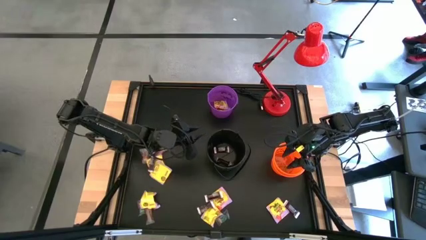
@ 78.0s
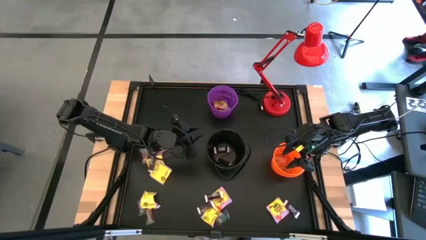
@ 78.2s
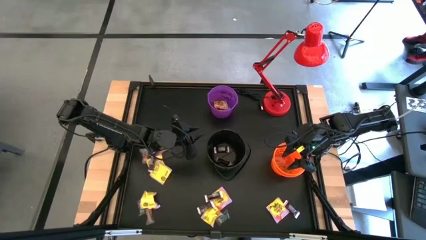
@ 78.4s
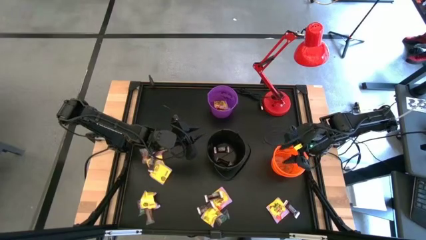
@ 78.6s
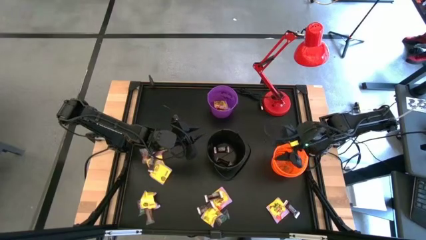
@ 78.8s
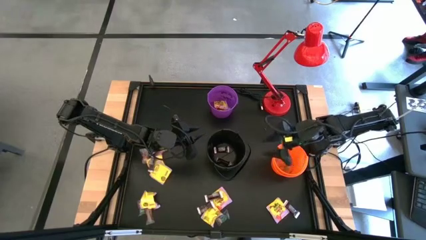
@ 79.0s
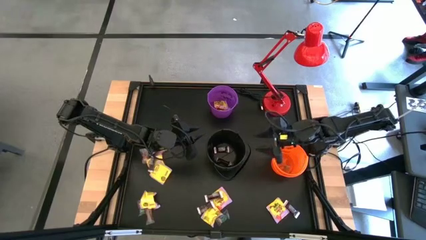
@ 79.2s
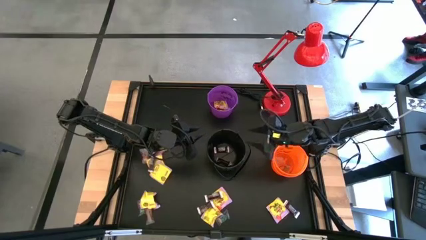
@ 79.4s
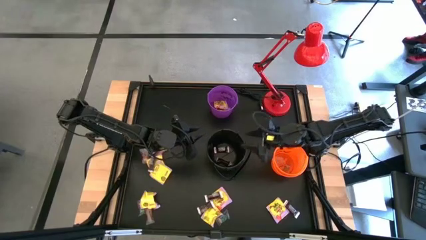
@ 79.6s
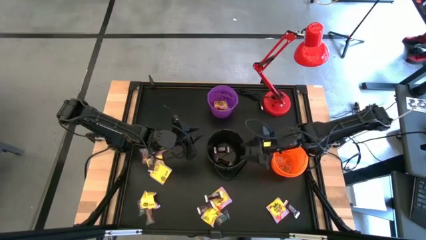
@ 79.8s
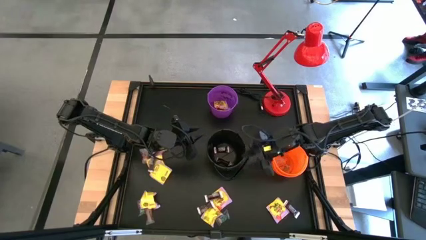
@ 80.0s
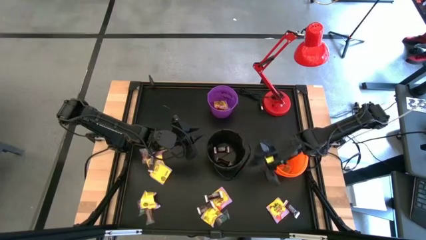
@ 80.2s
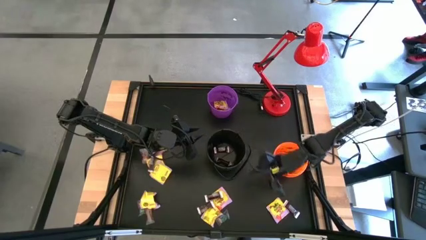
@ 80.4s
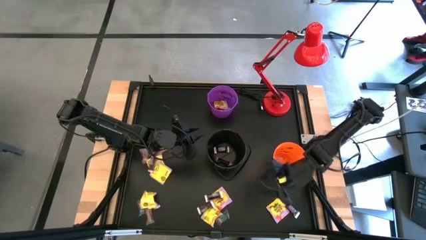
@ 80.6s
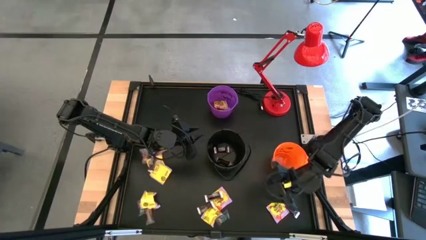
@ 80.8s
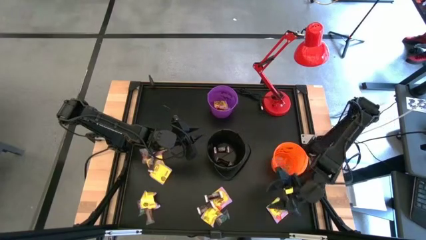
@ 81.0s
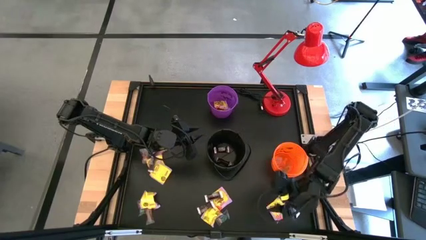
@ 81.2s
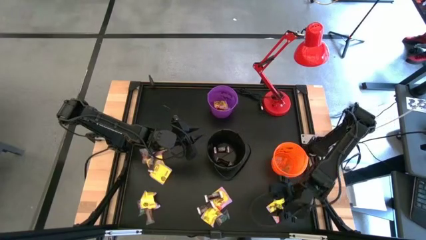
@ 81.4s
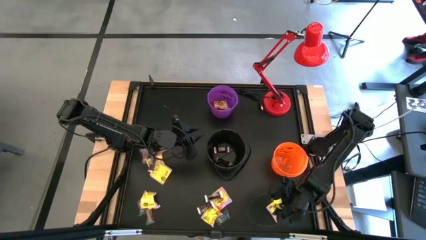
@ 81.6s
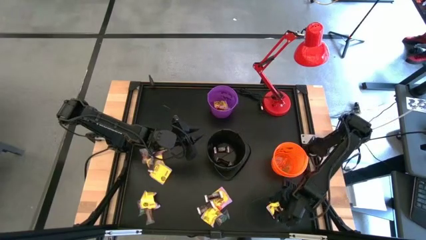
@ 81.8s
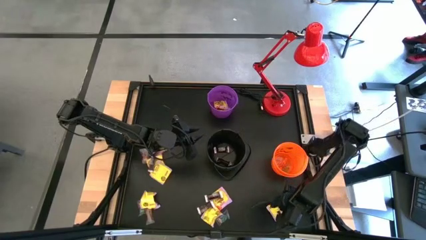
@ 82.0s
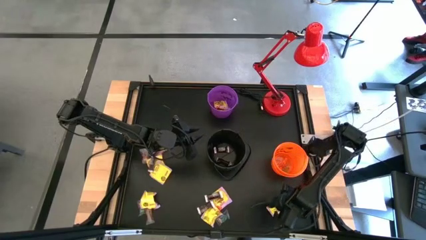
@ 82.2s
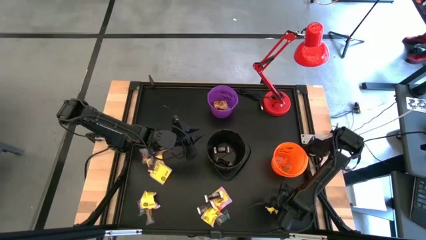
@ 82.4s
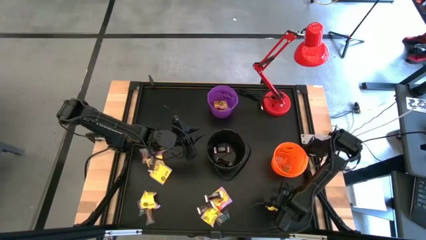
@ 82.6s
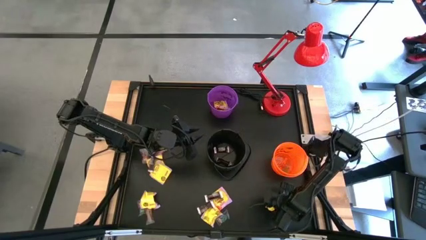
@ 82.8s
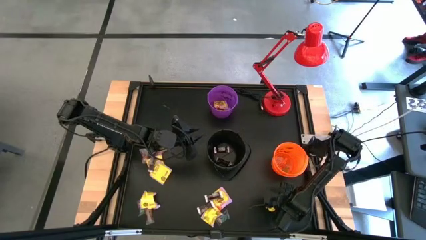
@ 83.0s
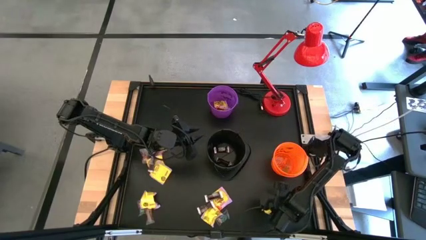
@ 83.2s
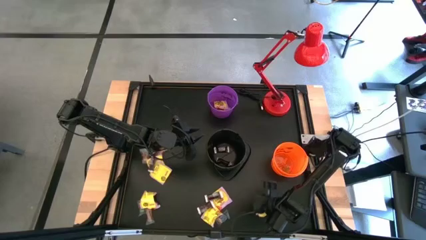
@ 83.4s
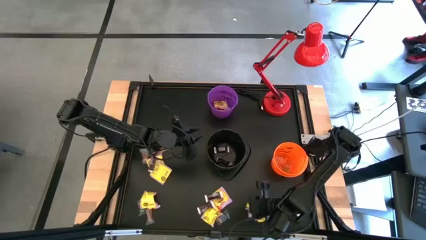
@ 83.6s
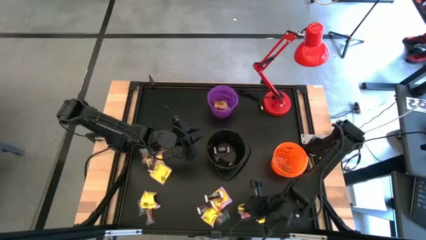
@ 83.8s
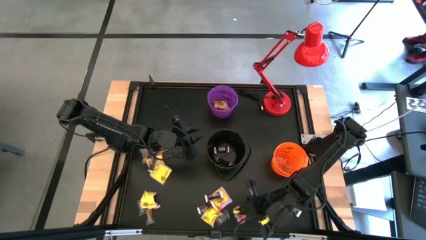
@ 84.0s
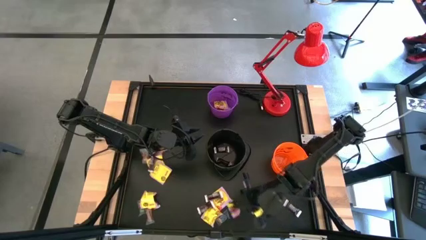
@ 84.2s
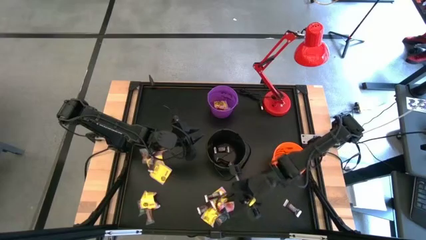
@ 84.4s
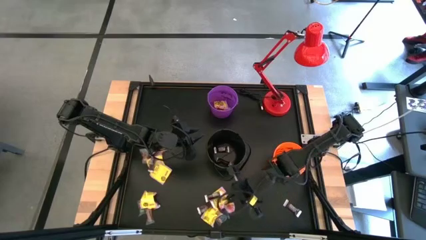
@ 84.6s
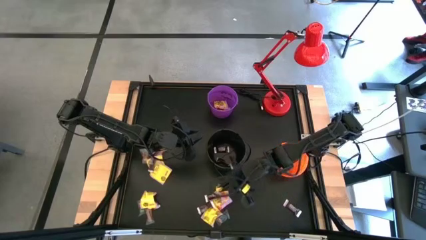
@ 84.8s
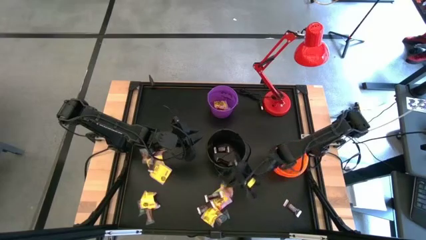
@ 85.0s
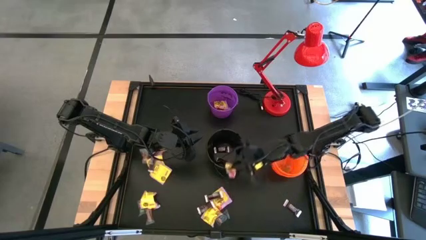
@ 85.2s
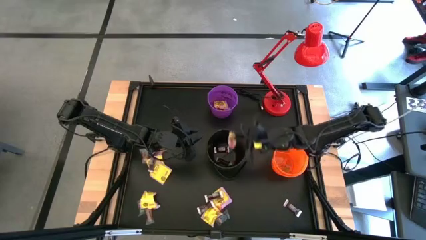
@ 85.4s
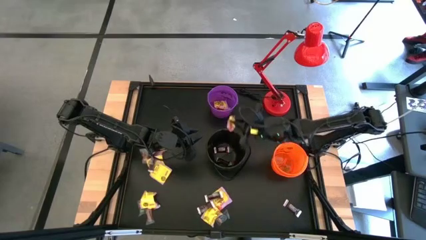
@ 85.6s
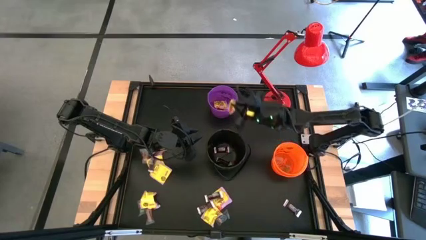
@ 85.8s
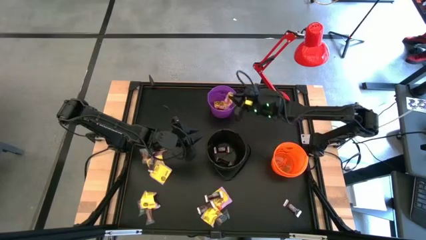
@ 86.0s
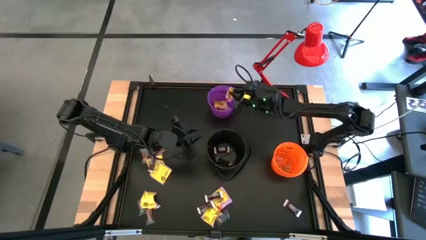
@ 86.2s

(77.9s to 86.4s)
Task: Sort candy
Put the yellow candy into the purple bucket

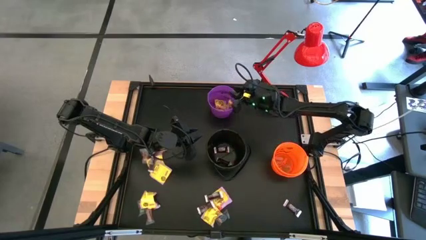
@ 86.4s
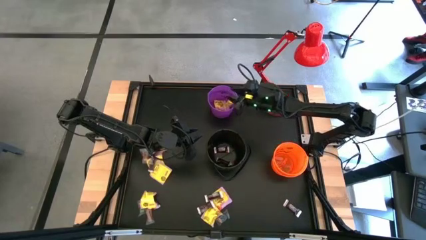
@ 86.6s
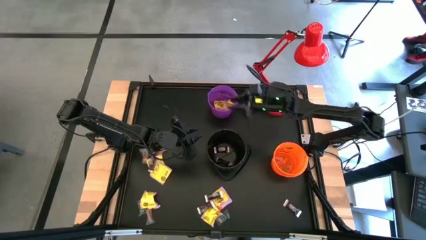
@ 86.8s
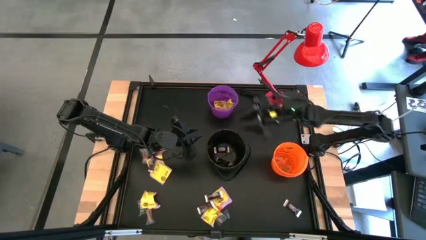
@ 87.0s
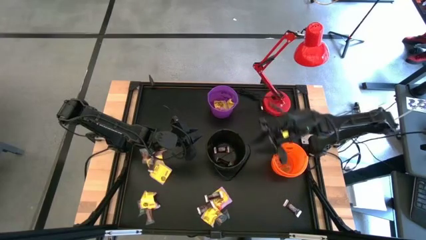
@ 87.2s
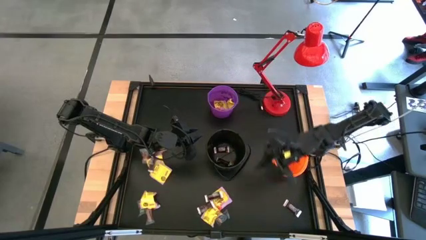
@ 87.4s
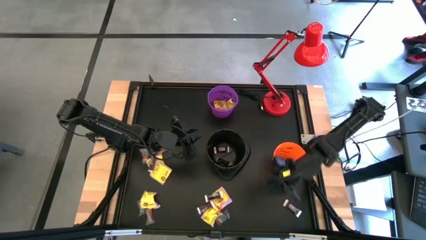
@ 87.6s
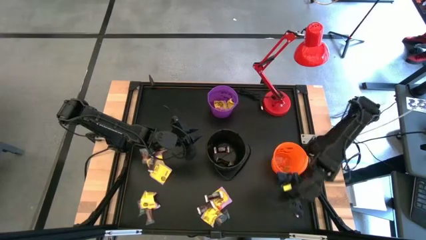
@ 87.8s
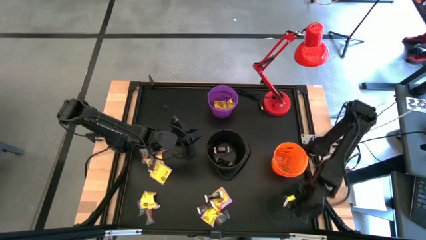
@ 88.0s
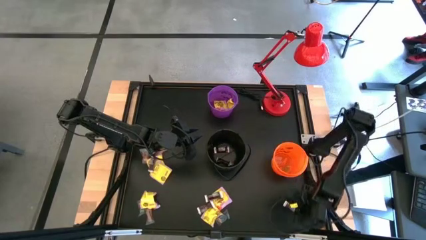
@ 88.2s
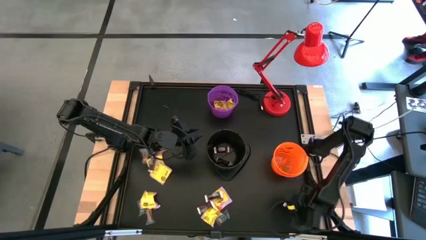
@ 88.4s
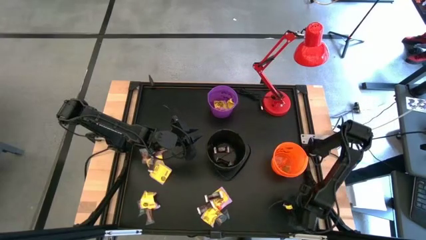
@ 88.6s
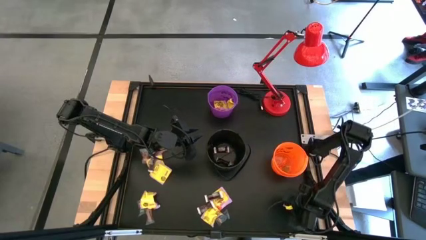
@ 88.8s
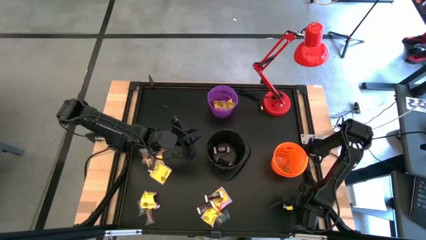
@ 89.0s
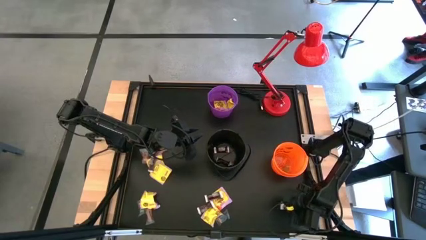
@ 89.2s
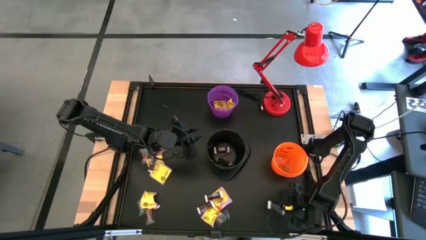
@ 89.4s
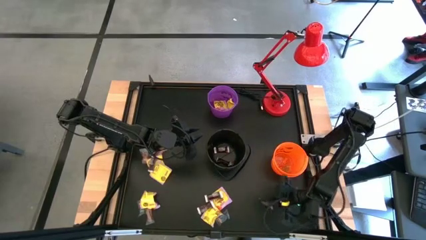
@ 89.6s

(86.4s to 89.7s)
Put the brown chocolate into the black bucket

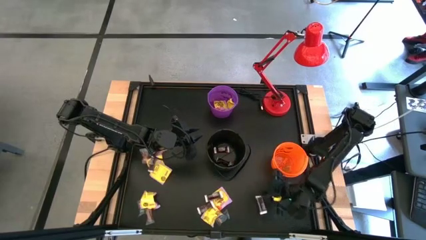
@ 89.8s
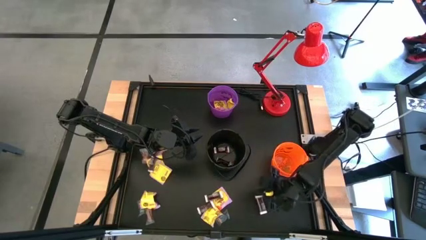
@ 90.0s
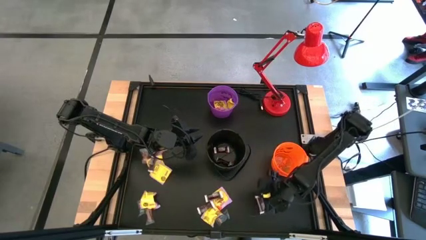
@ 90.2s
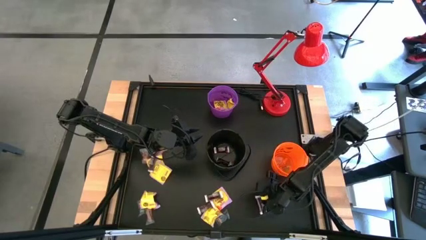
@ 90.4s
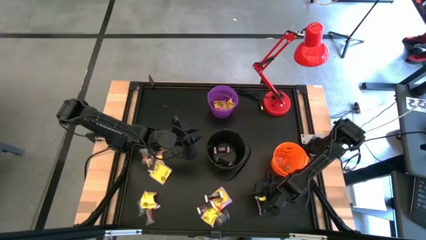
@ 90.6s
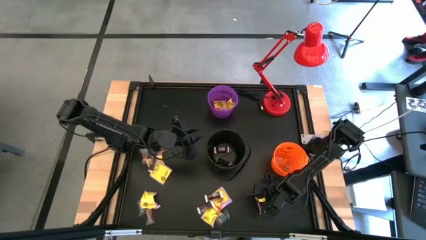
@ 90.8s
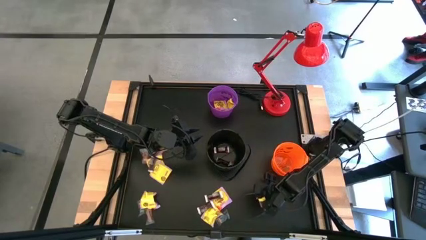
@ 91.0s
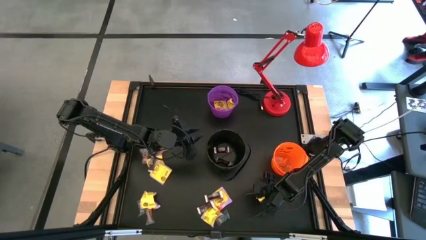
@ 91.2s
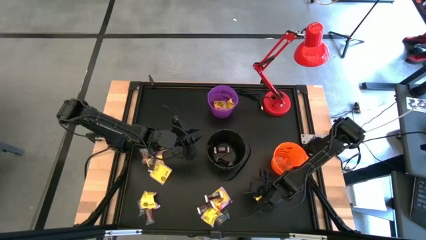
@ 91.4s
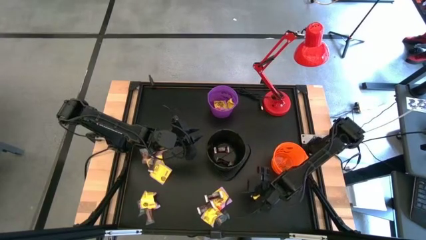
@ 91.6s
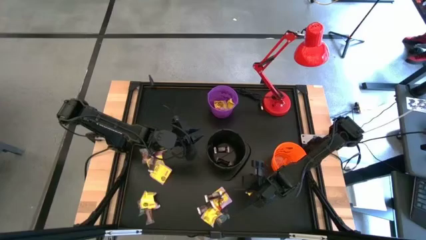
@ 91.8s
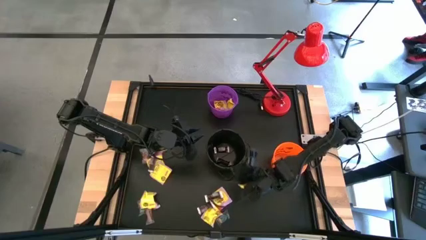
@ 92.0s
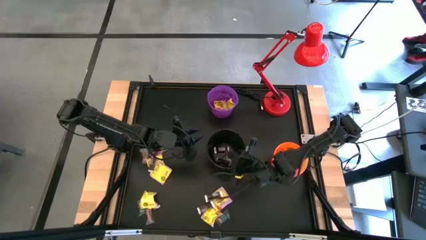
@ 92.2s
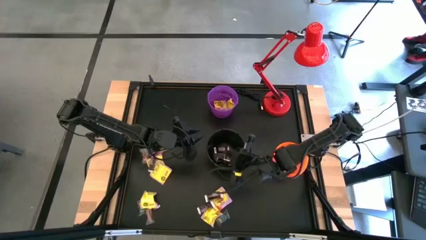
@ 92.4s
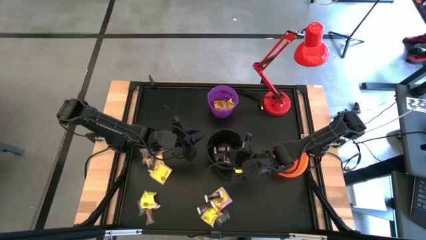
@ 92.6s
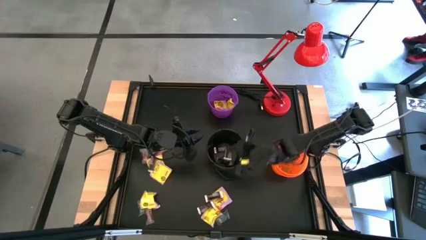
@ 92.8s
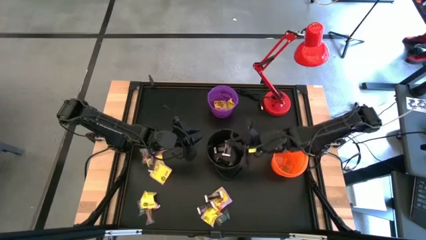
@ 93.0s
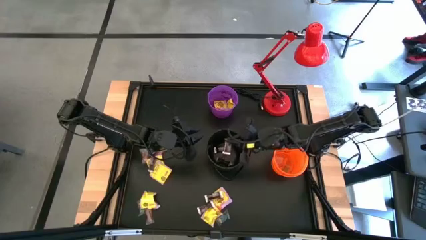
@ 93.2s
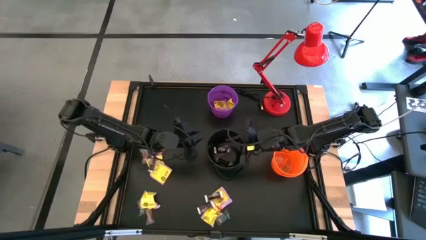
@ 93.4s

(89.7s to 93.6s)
Put the brown chocolate into the black bucket

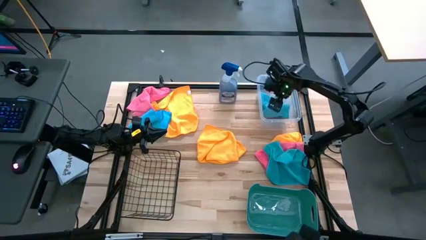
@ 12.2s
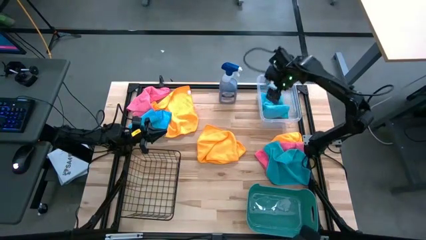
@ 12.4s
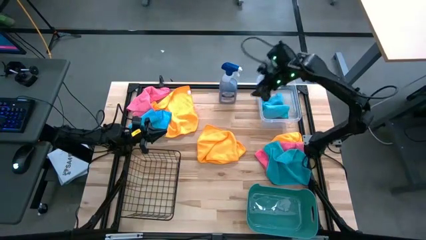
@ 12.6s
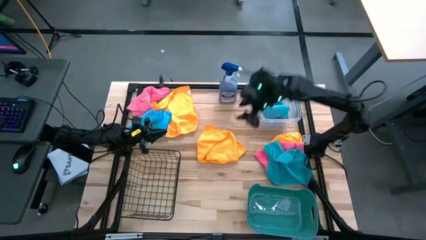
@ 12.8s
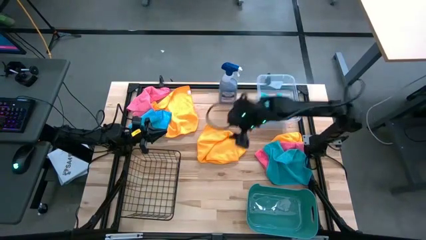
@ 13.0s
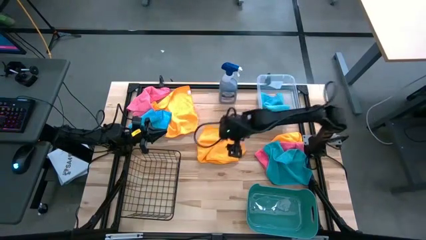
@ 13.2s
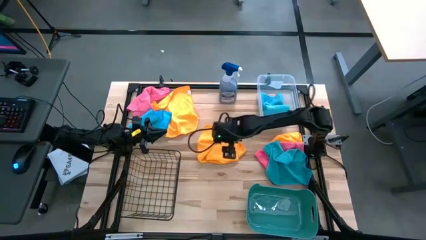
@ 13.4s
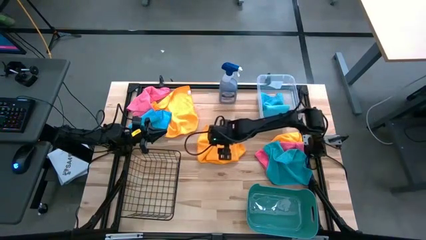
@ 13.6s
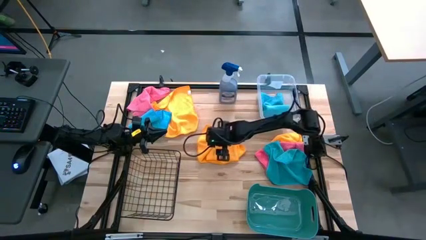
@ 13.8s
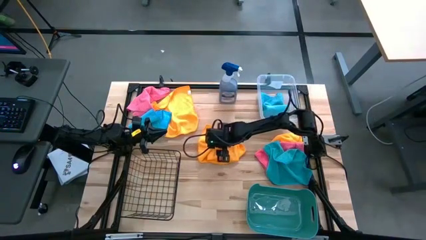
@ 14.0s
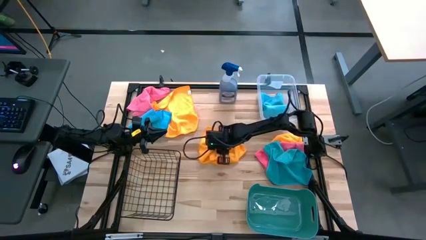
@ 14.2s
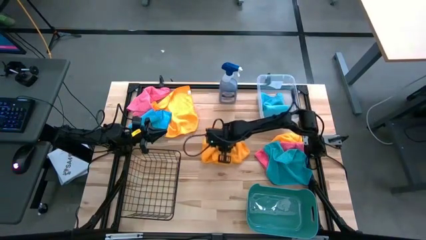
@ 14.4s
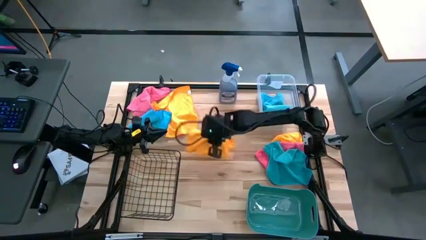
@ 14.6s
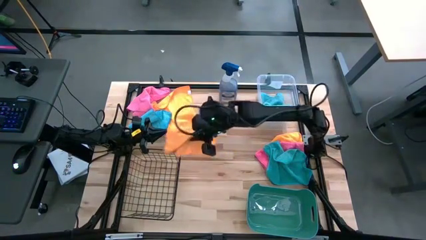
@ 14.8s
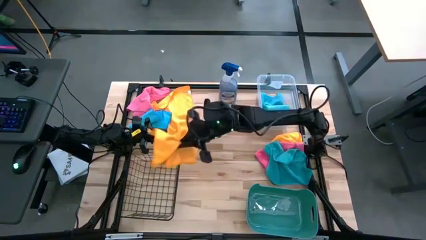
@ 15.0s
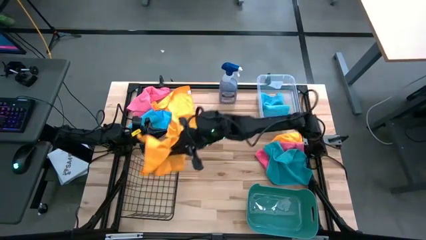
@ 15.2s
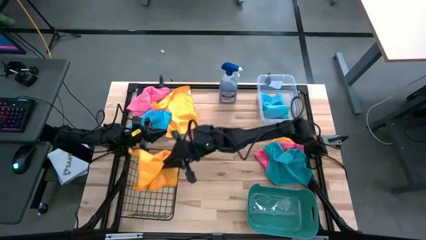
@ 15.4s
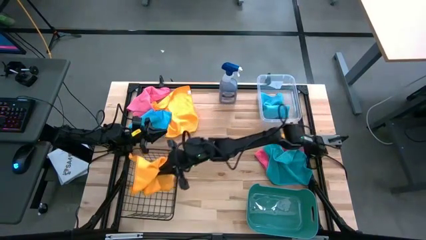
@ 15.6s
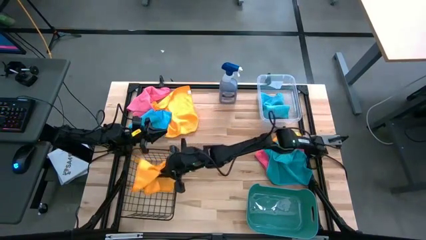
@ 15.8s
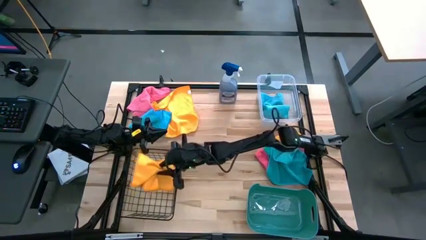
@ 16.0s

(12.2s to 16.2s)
Task: Sort microfiber towel by color & place in baskets
Put the middle orange microfiber towel into the black wire basket
